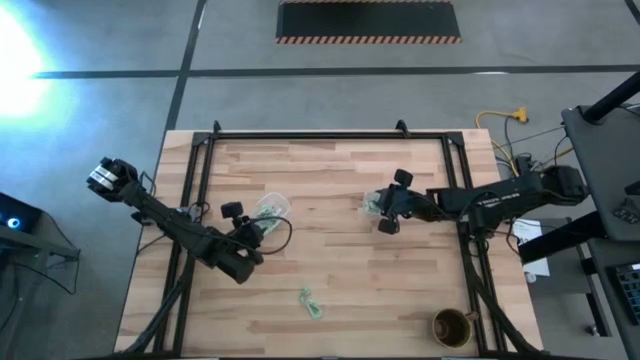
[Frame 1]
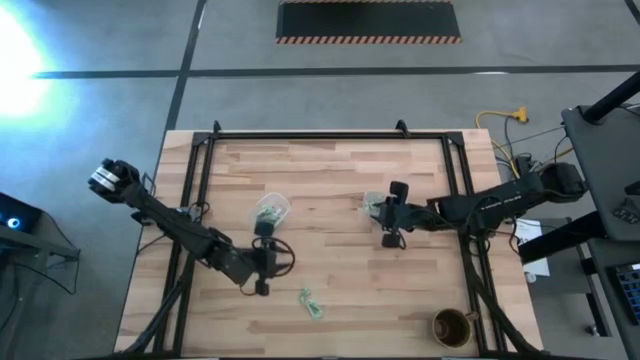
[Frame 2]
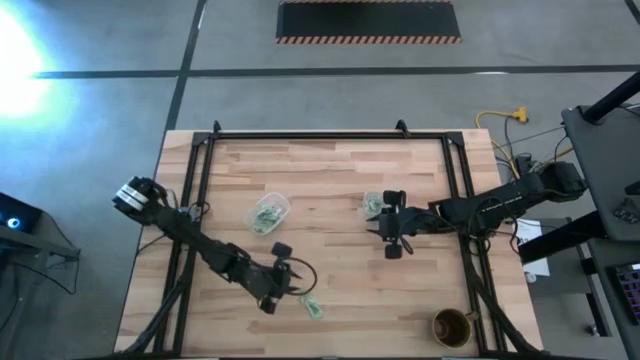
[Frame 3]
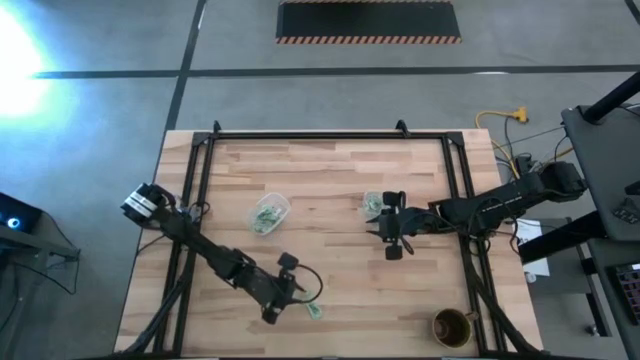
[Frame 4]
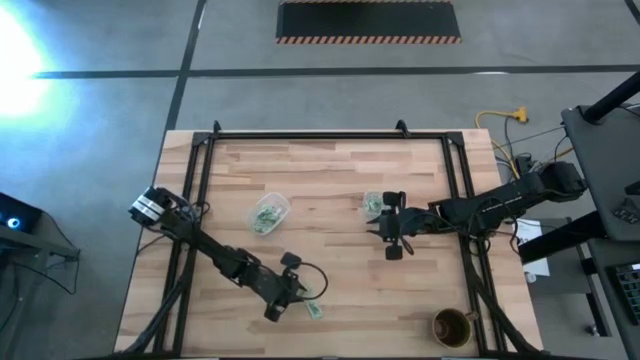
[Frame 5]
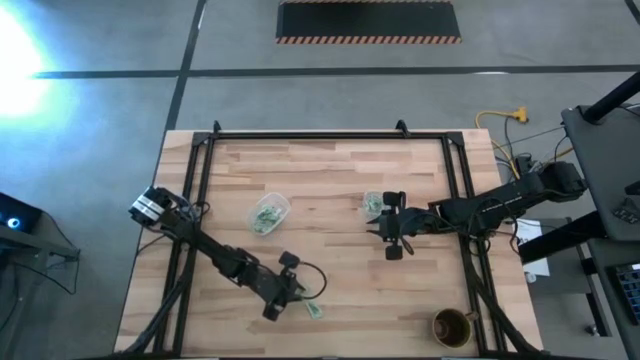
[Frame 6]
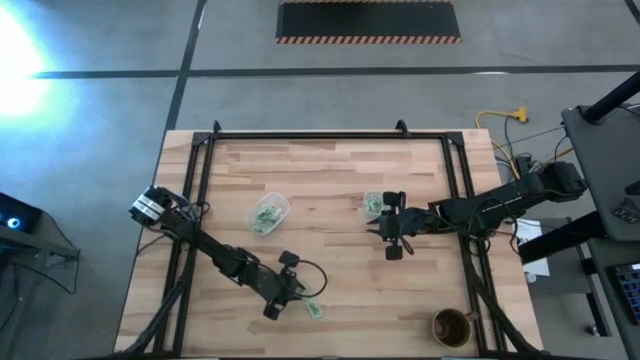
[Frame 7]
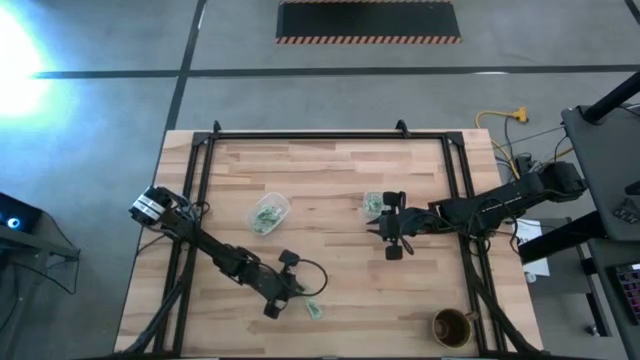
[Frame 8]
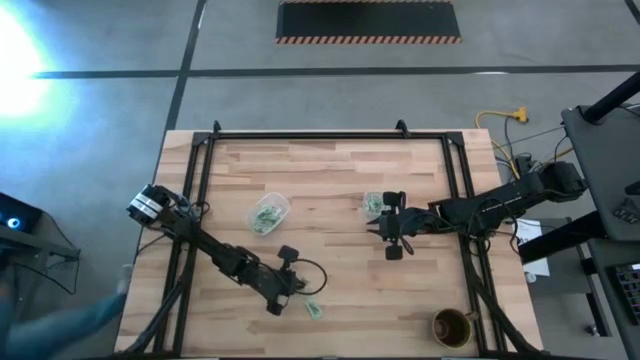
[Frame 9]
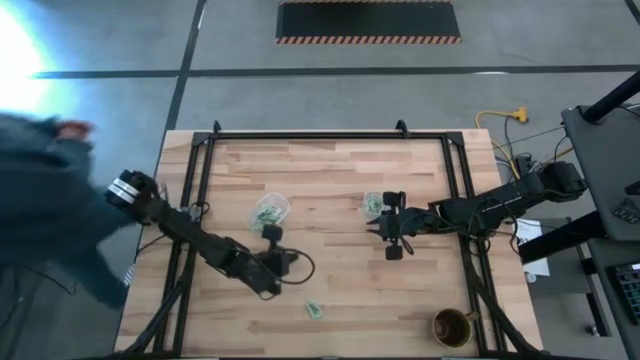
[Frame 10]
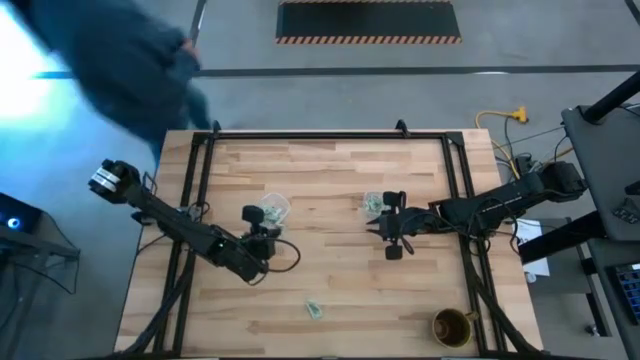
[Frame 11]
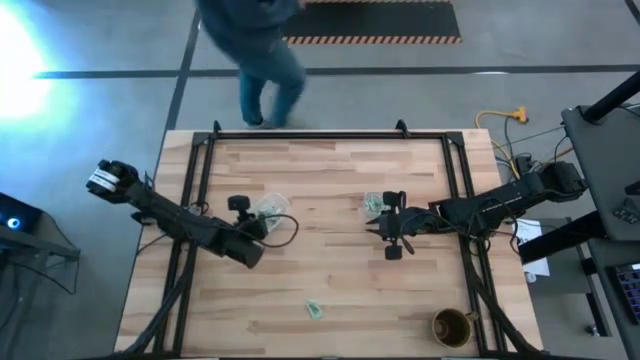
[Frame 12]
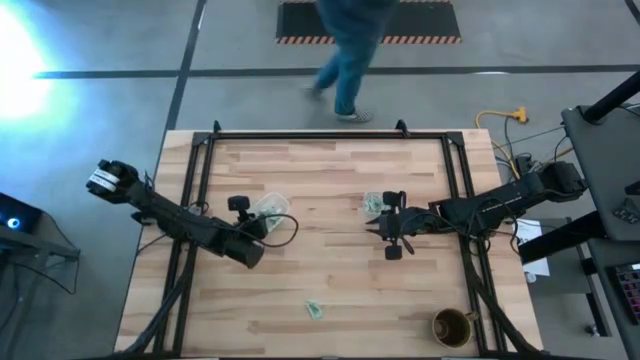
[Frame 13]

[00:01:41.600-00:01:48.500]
Task: Pick and place Stevia / Truvia into bins
Put the top light green stevia packet into the left transparent container

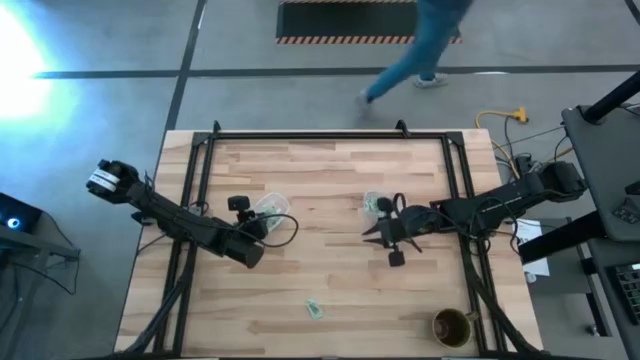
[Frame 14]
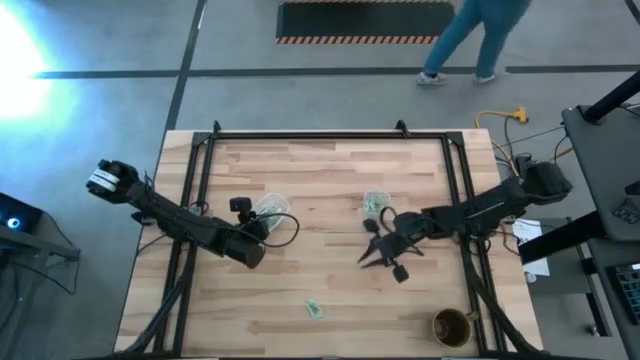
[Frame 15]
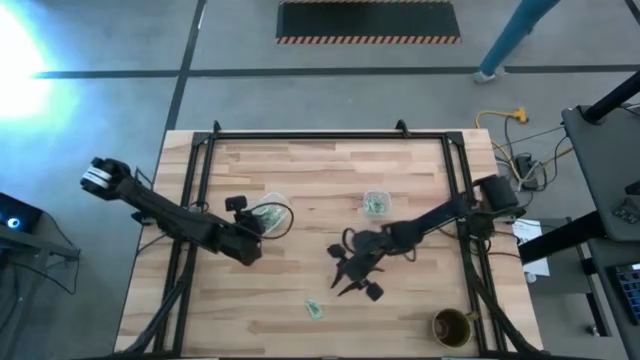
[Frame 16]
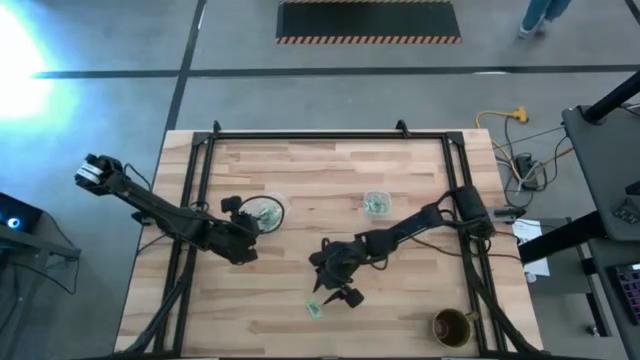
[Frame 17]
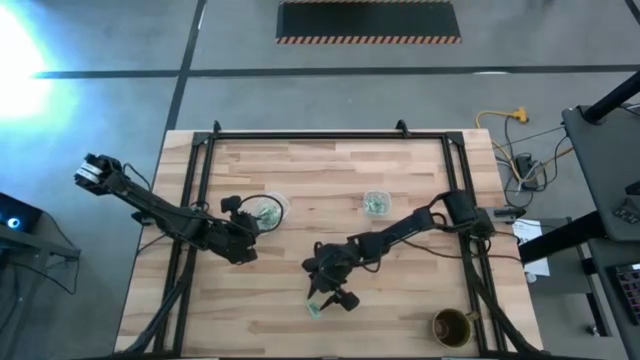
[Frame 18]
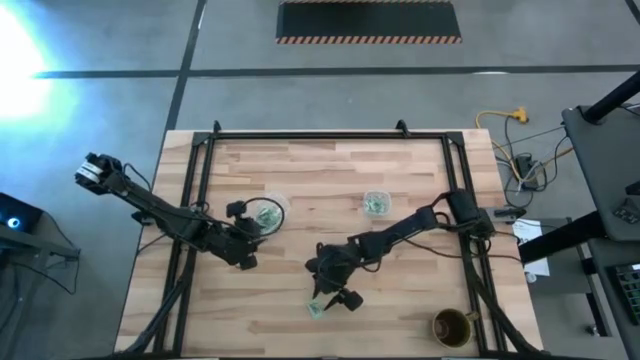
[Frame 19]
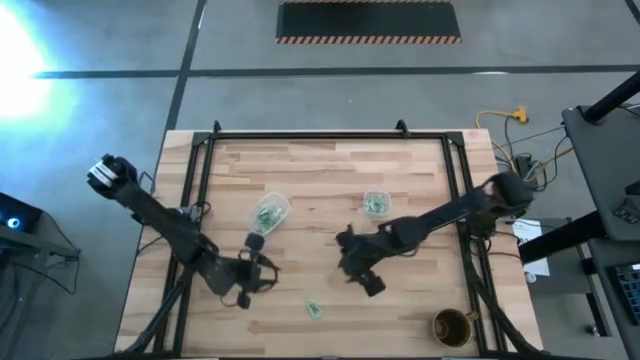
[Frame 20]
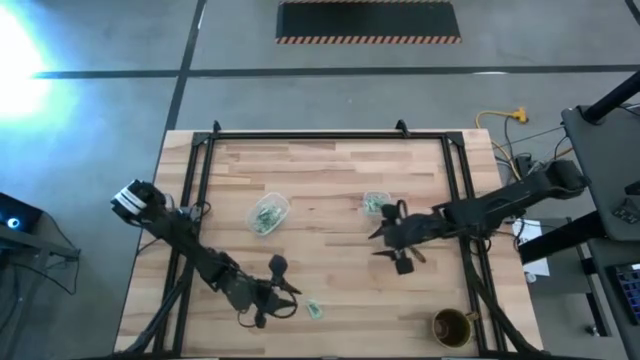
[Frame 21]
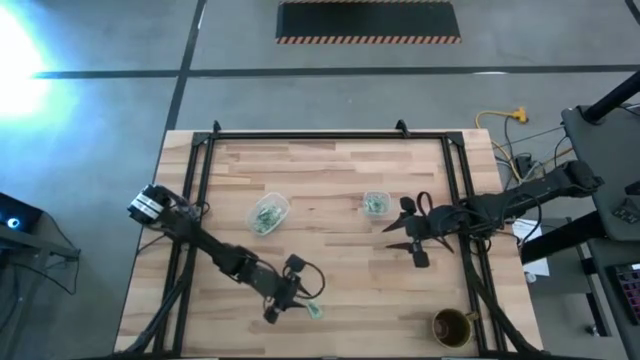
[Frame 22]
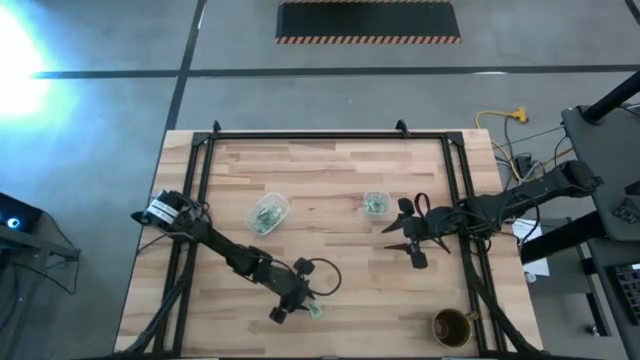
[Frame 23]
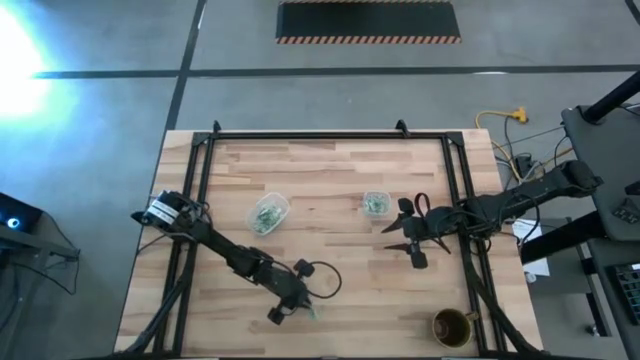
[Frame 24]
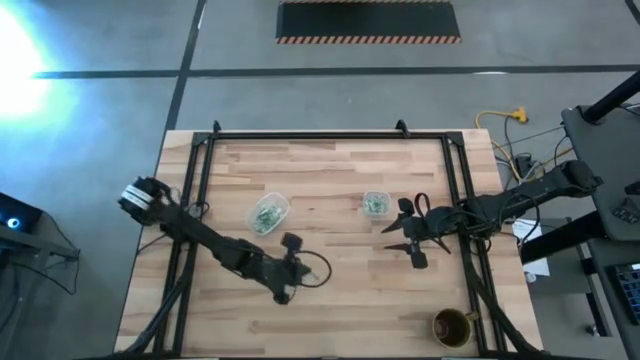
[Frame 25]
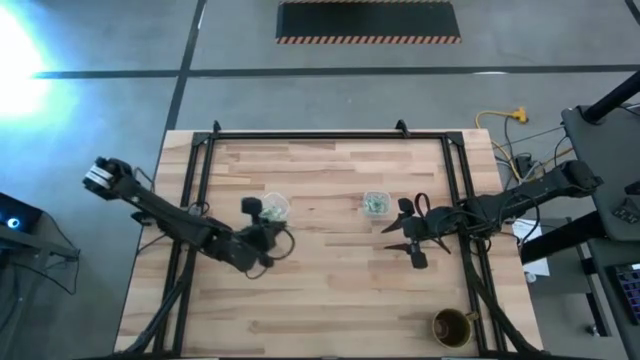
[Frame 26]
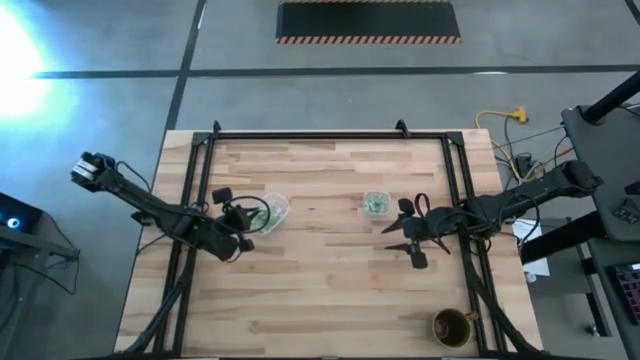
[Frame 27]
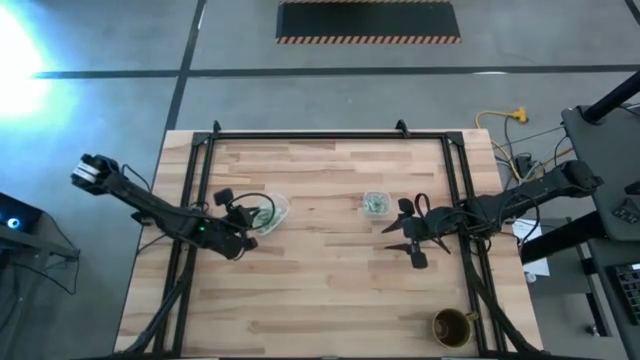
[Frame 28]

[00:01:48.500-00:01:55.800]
Put the light green stevia packet into the left transparent container

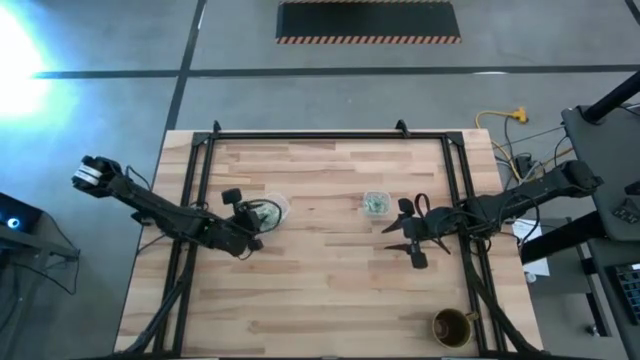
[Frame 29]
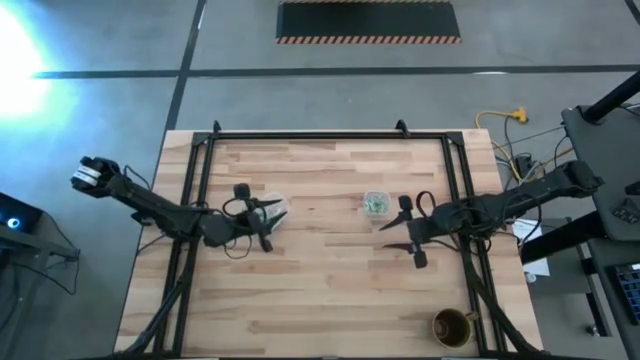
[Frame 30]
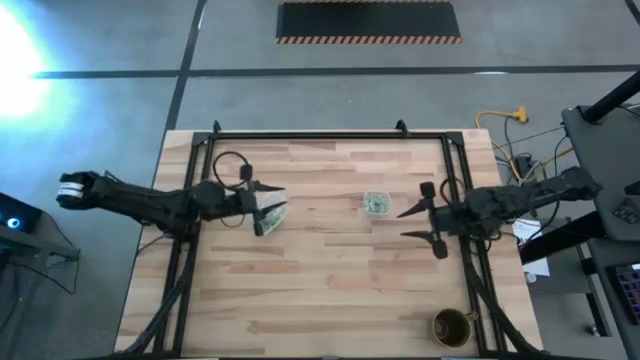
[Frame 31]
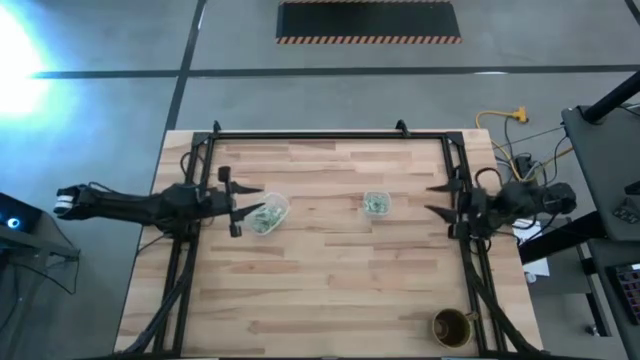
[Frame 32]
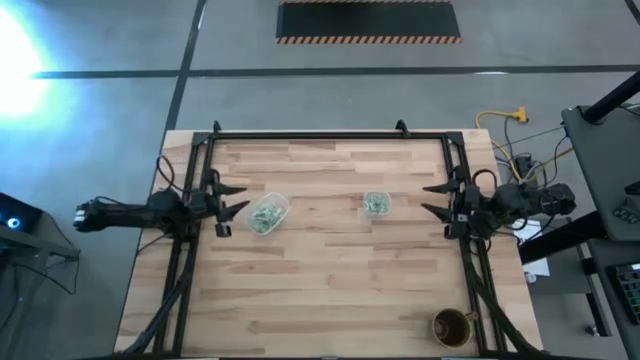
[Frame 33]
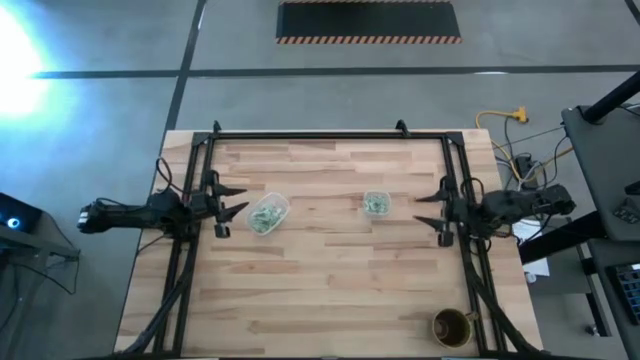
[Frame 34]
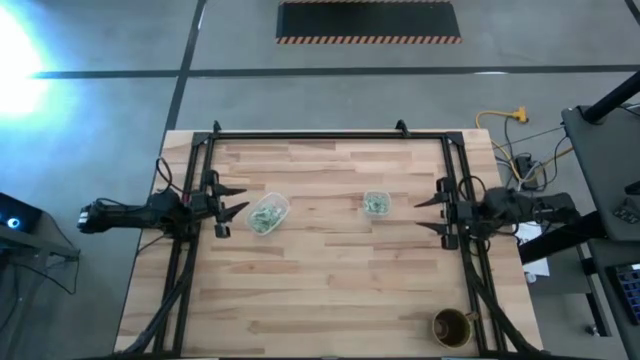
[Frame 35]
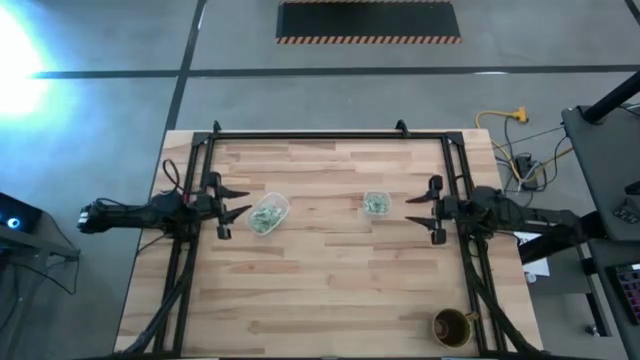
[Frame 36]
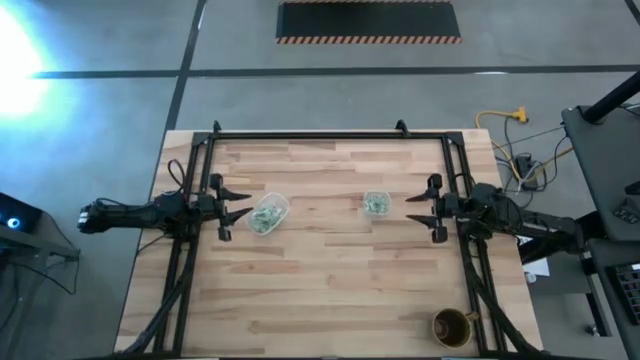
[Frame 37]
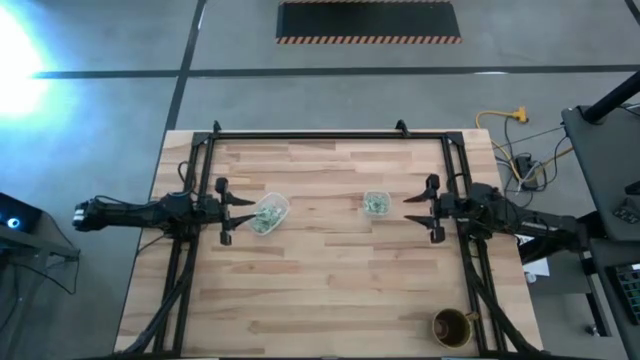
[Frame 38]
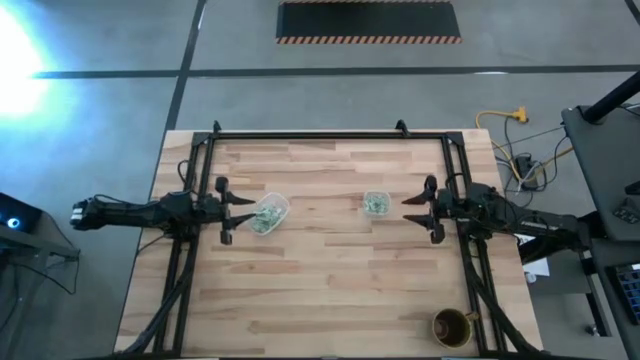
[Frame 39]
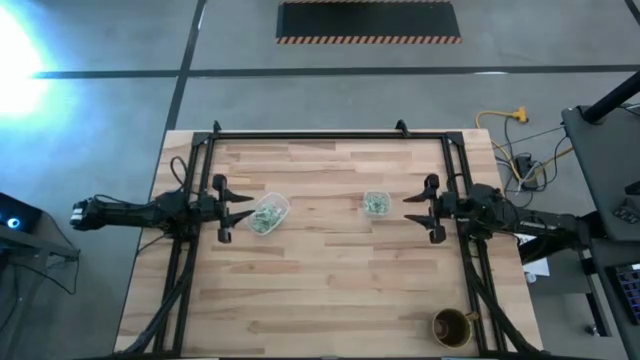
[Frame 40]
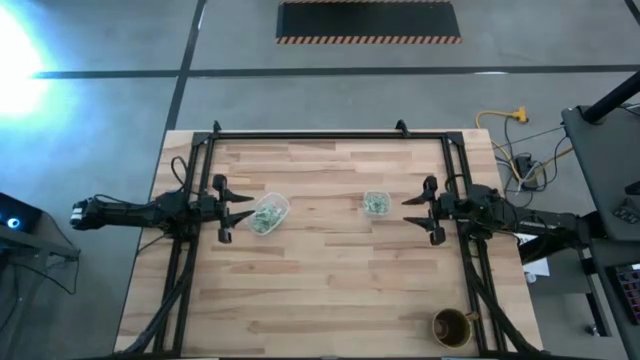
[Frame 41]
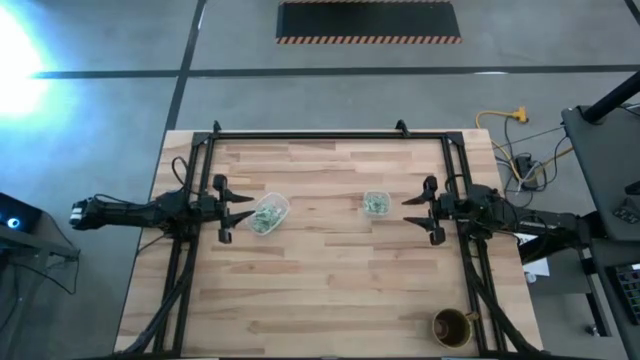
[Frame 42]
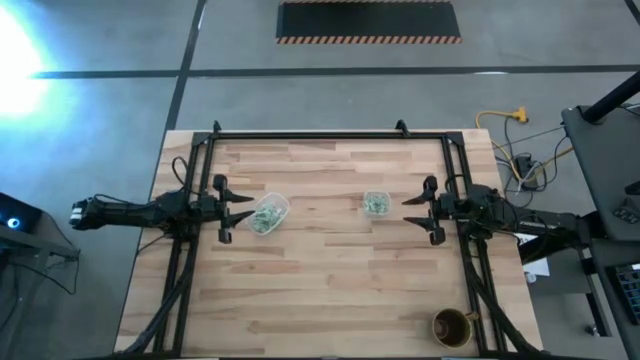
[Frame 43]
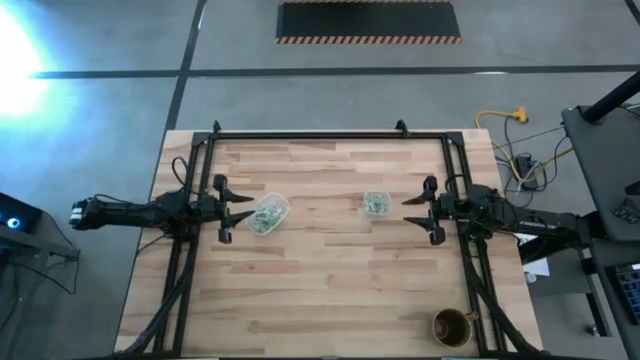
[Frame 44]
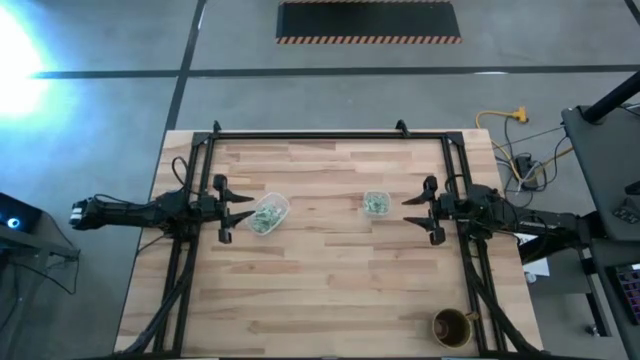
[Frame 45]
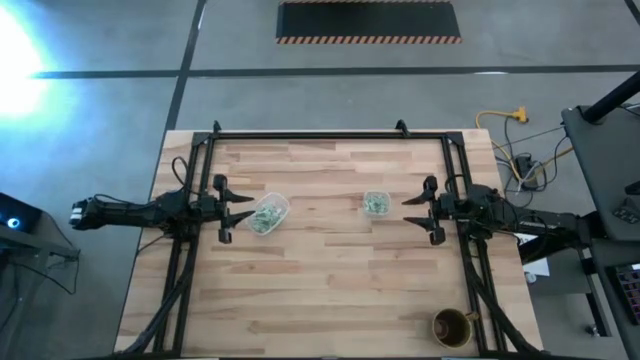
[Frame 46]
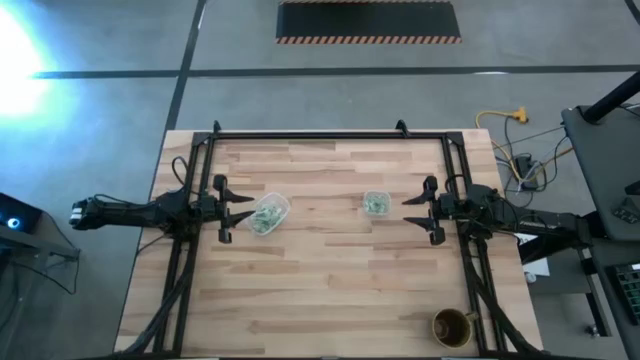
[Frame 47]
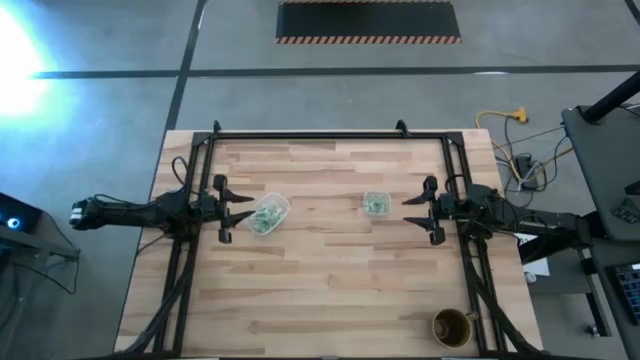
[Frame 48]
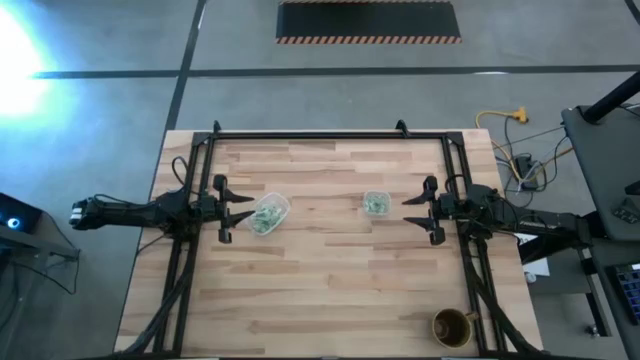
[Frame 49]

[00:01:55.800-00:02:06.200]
Return to Home Position
